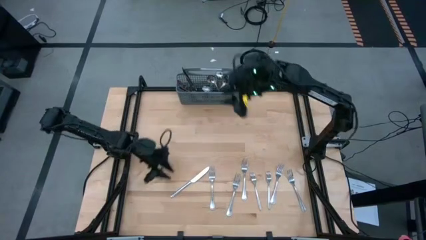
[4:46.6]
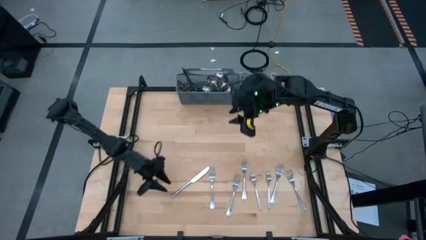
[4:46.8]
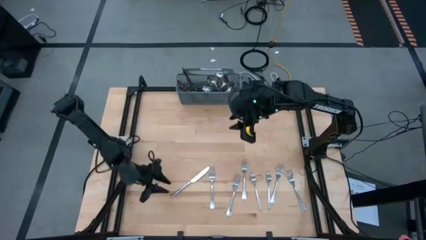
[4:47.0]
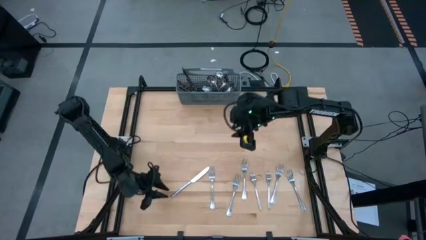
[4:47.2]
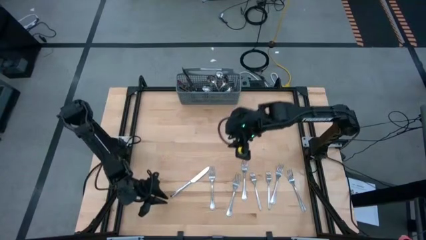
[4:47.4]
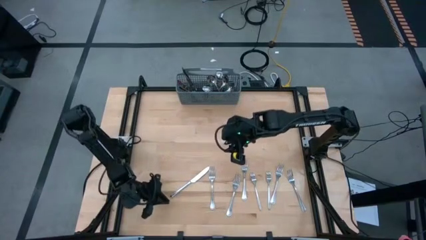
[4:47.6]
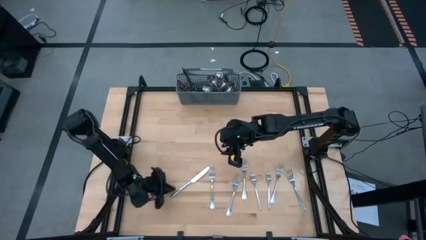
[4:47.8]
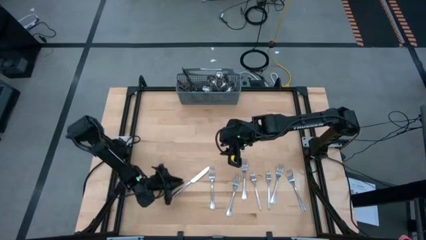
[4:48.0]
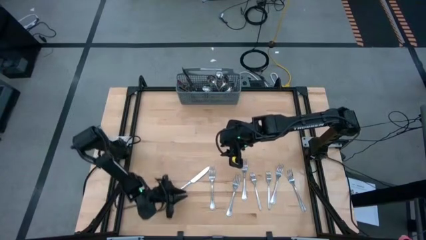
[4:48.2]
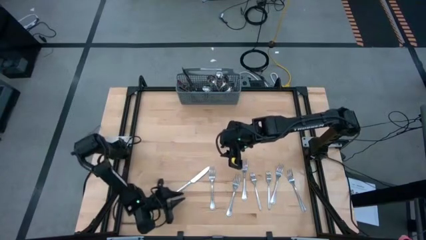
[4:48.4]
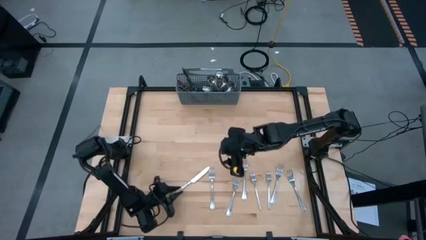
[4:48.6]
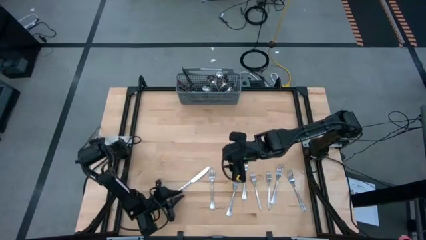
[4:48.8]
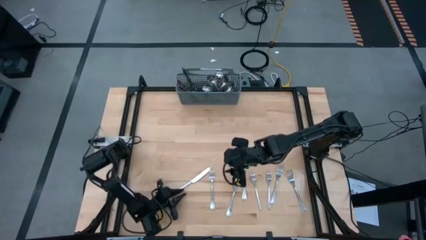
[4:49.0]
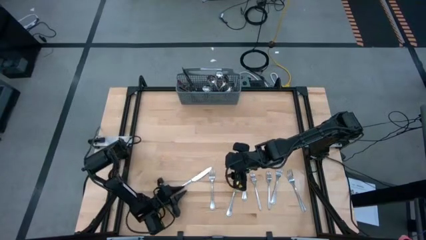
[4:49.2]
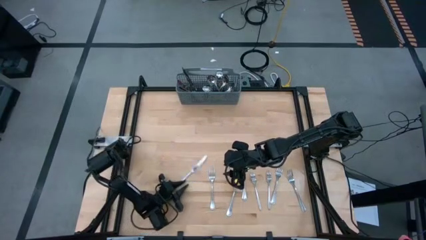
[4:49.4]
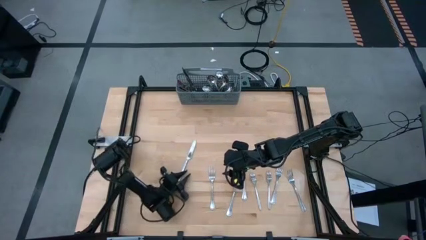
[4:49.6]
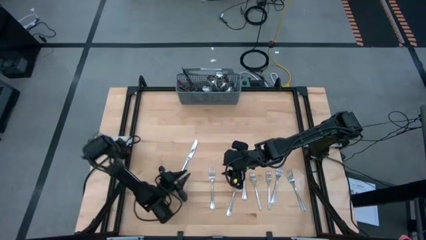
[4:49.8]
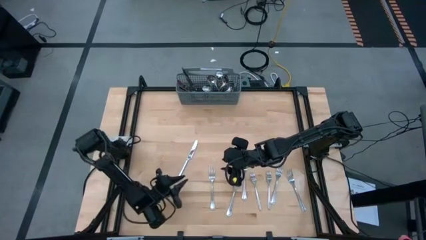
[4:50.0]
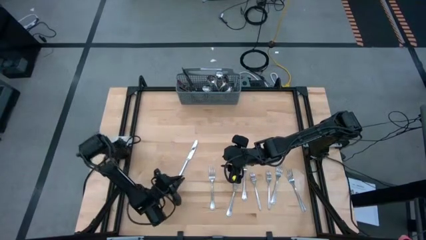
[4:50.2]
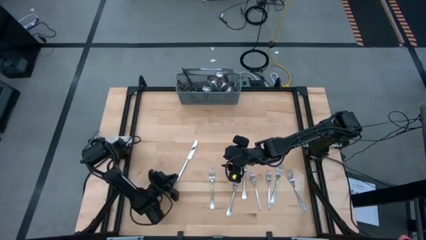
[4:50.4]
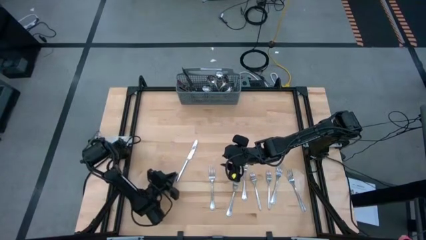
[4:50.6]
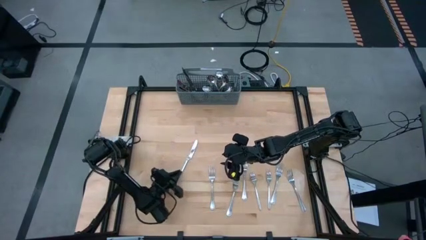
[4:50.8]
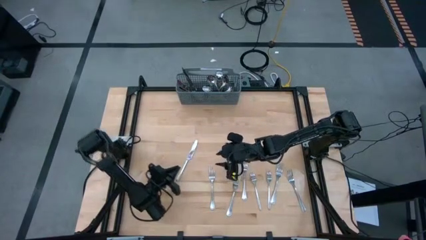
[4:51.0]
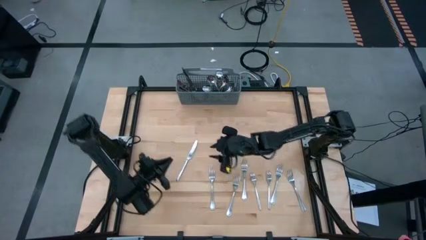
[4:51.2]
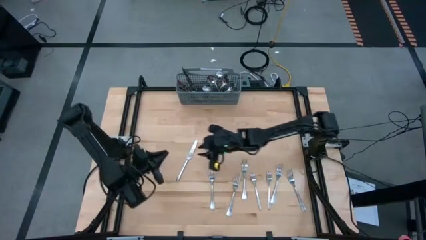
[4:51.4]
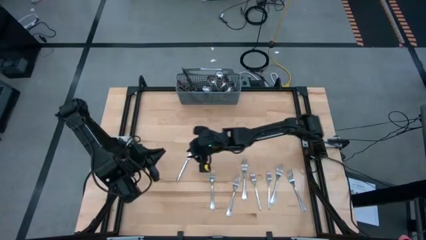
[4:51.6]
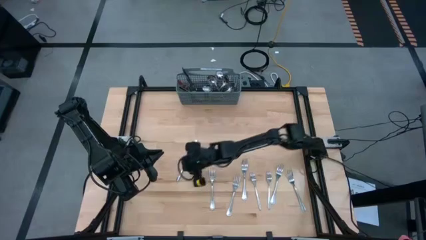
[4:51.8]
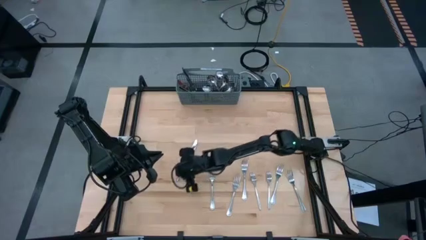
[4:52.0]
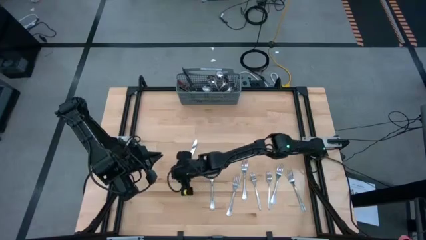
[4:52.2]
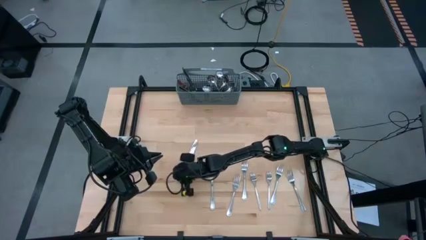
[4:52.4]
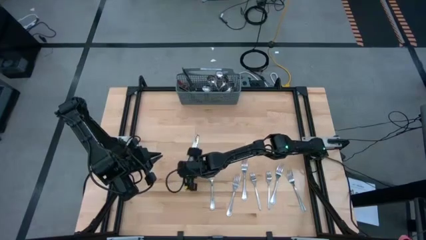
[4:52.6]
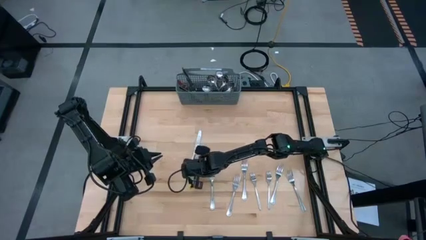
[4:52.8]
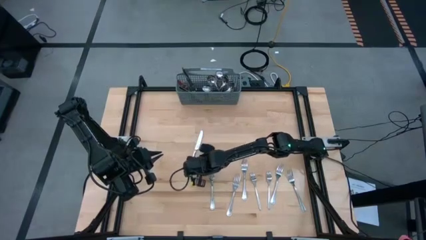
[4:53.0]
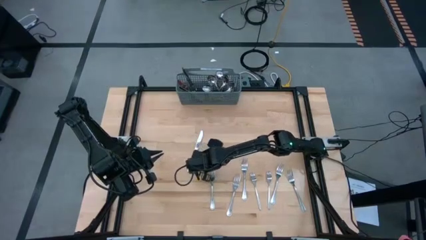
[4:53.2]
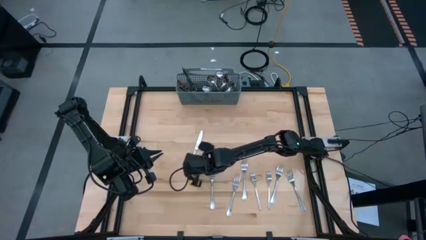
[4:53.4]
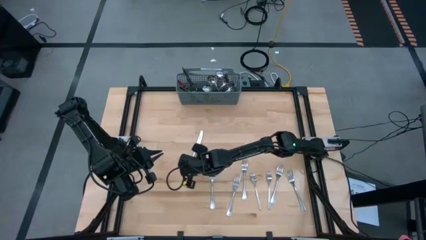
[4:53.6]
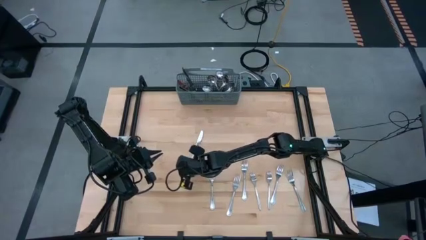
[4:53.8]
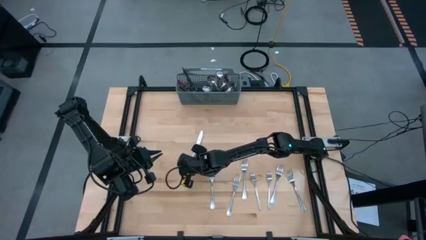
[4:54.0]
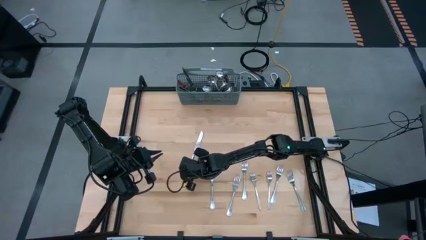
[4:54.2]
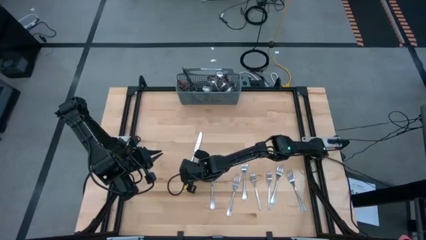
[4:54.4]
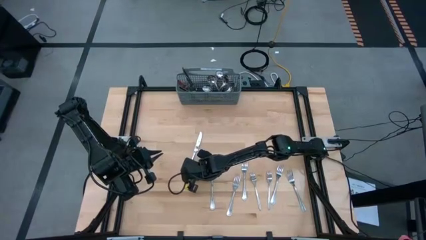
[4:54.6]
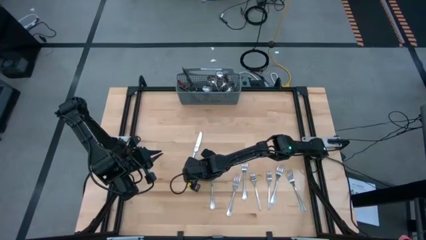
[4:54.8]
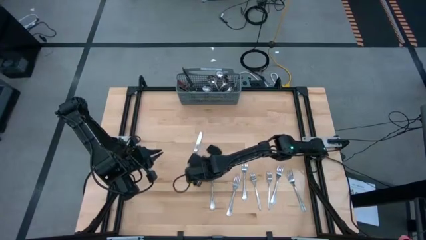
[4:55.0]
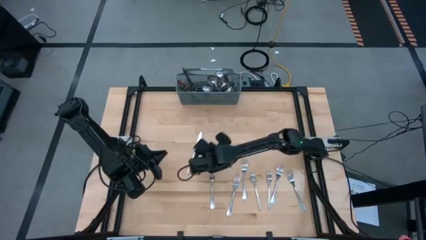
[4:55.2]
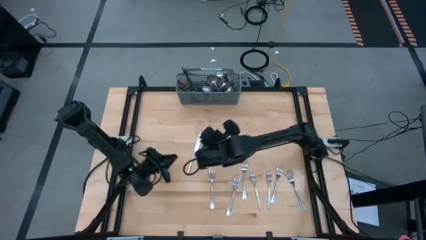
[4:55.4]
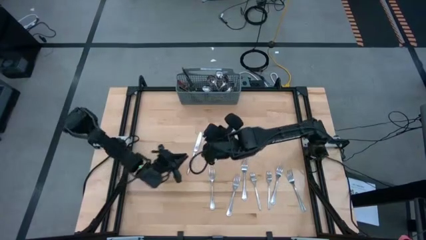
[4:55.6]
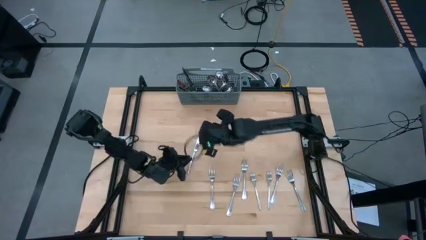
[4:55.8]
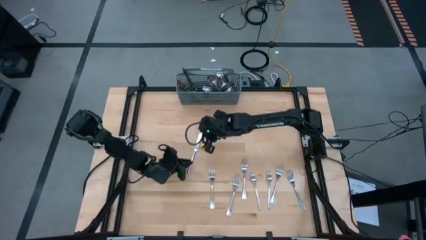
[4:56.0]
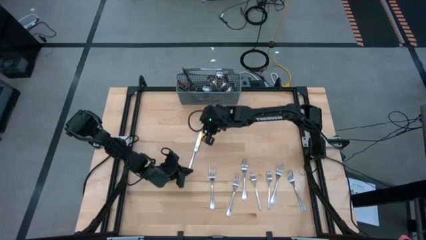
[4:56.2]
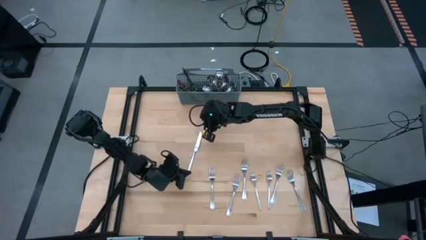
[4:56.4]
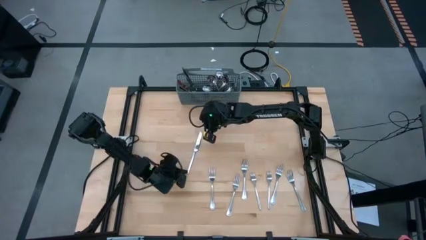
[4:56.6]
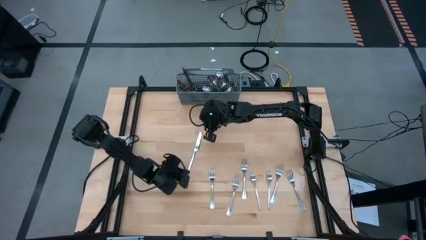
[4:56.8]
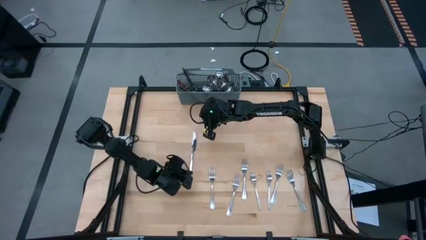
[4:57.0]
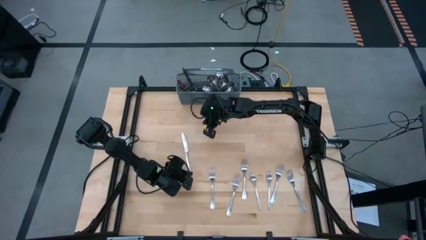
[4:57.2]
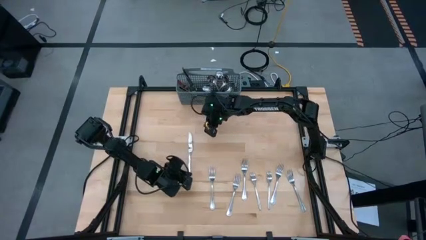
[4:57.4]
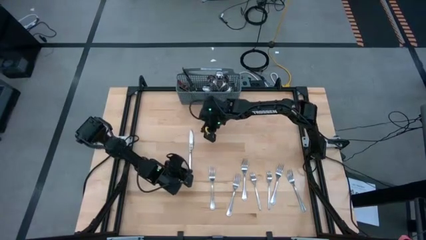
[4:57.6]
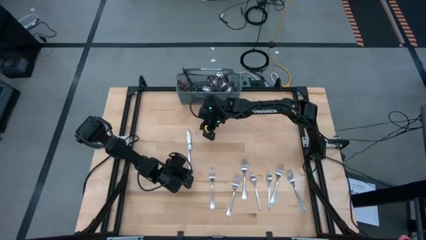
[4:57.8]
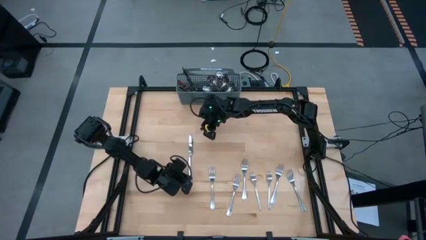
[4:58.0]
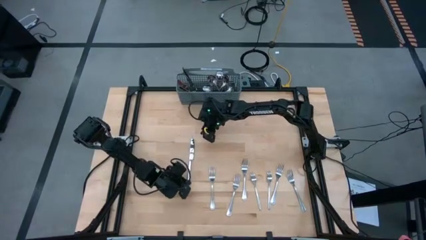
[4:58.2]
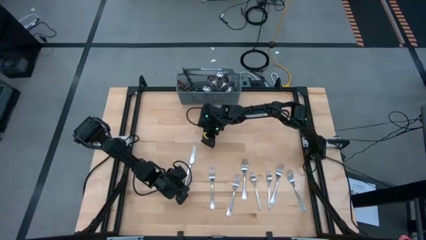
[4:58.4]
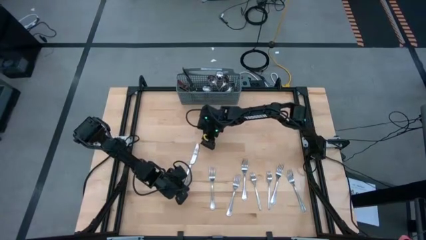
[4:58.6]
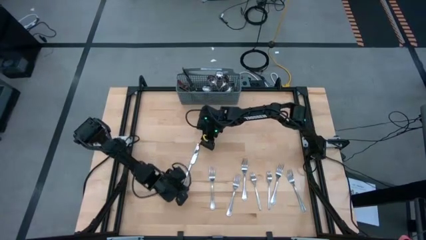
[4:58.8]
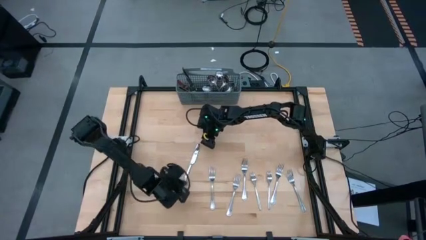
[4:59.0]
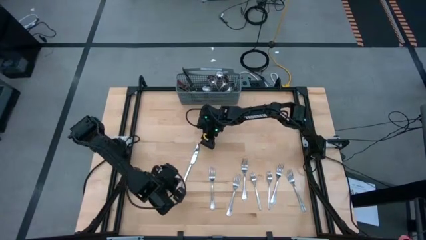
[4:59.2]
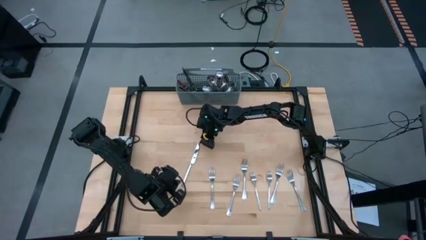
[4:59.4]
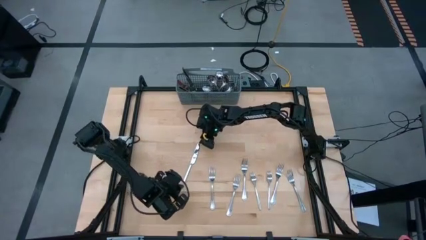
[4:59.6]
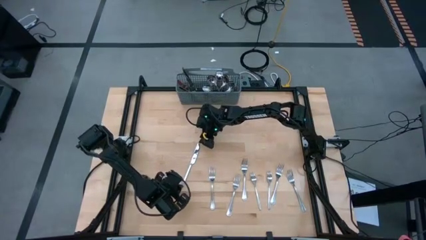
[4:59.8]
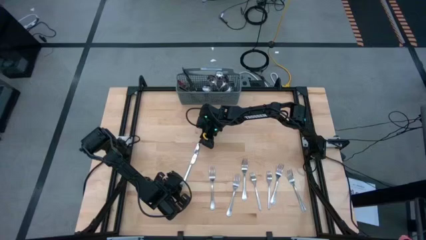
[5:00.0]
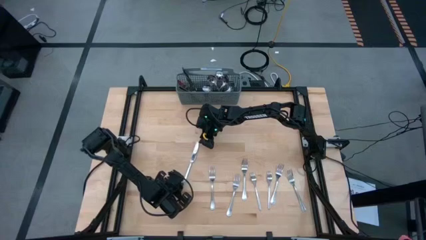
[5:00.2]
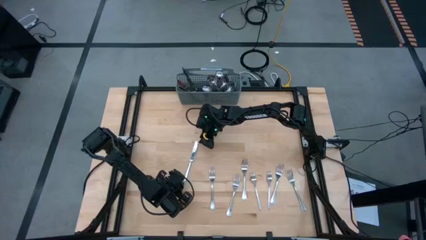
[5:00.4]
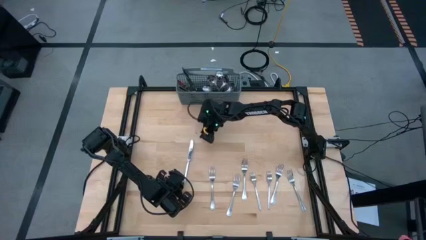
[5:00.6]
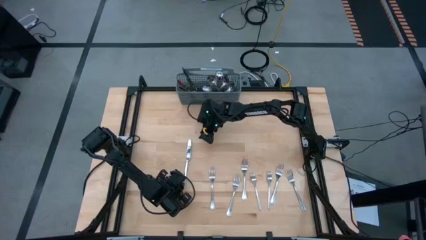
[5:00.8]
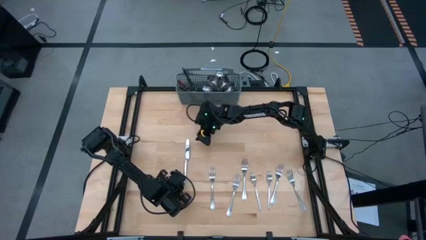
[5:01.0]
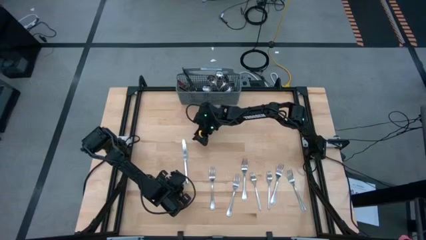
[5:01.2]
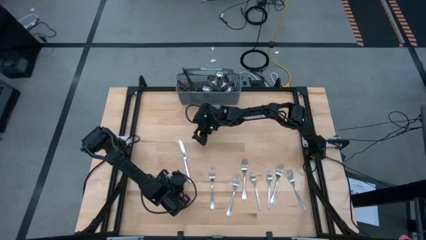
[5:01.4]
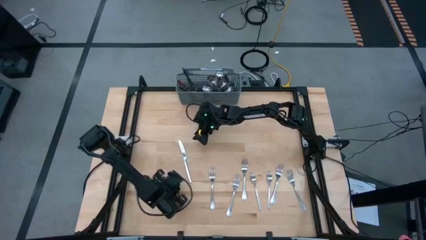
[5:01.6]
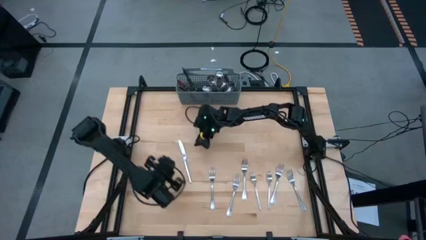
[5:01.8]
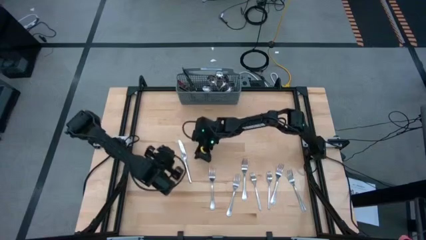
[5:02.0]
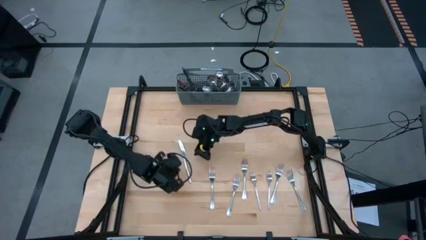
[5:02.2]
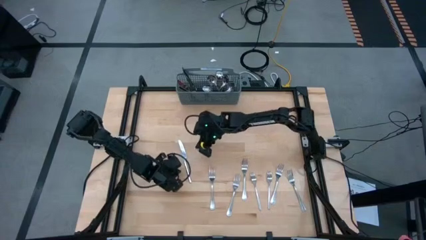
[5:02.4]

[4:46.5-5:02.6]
Task: Sort silverware
Put the silver knife into the gray utensil holder
